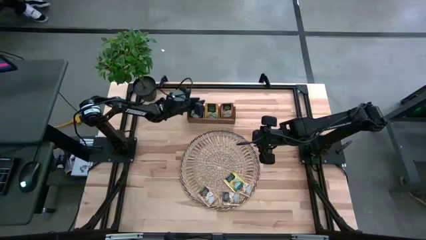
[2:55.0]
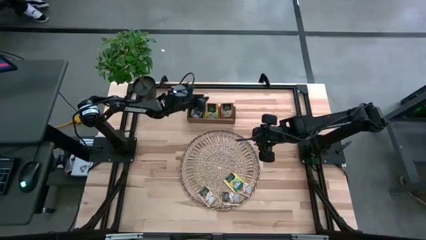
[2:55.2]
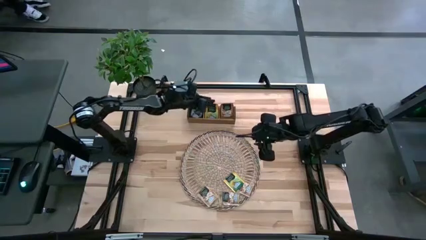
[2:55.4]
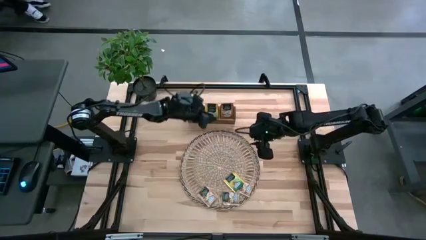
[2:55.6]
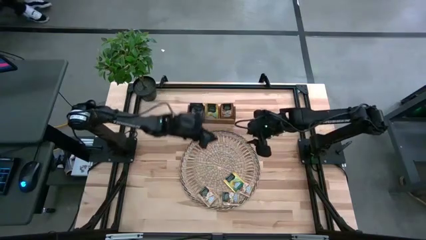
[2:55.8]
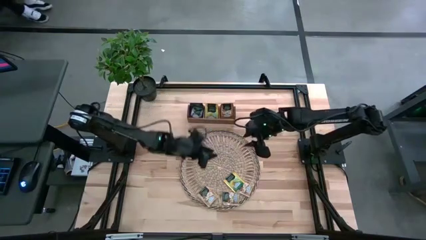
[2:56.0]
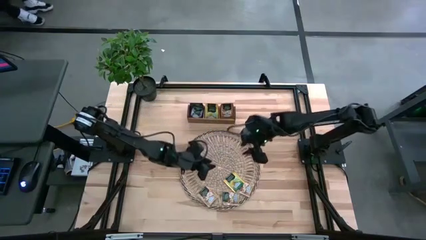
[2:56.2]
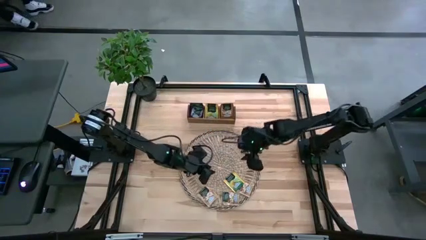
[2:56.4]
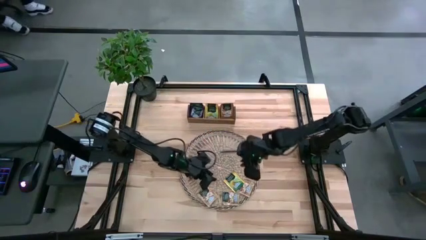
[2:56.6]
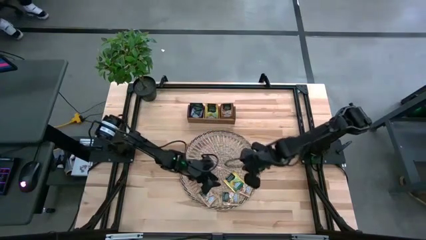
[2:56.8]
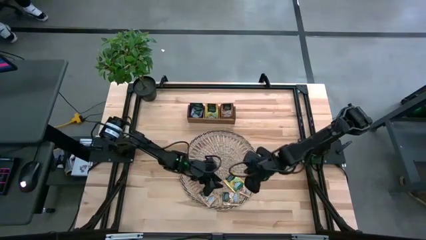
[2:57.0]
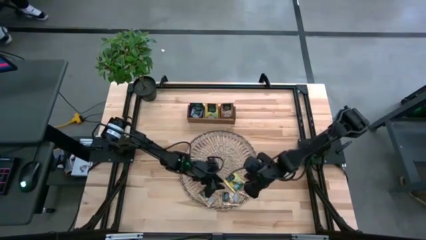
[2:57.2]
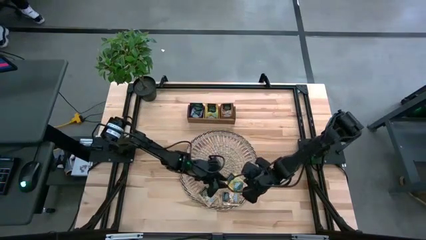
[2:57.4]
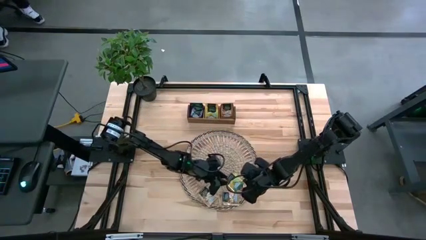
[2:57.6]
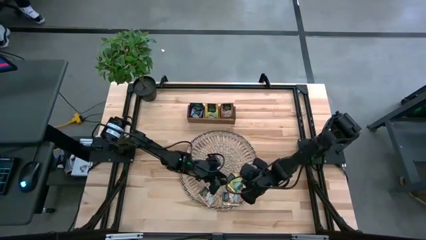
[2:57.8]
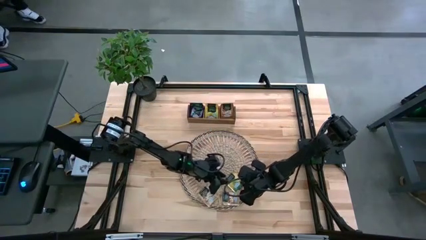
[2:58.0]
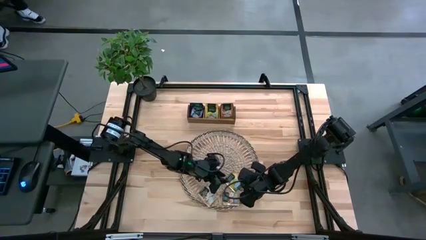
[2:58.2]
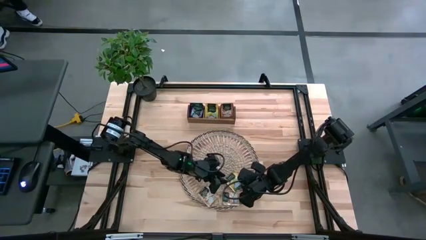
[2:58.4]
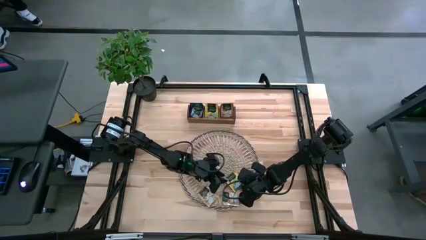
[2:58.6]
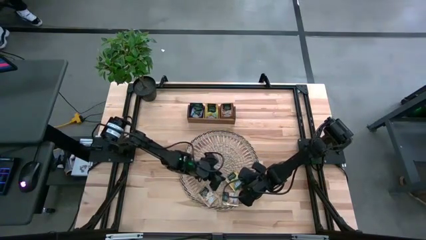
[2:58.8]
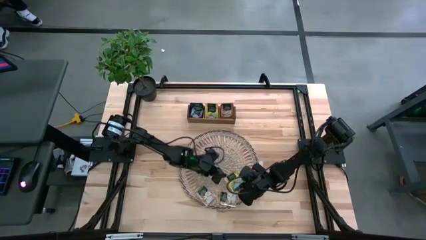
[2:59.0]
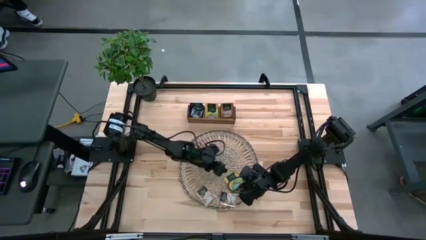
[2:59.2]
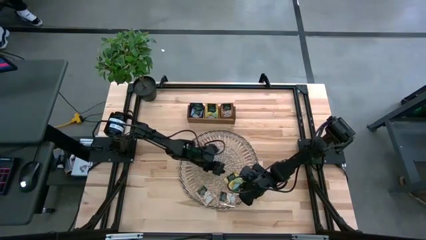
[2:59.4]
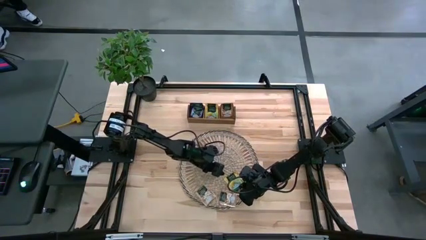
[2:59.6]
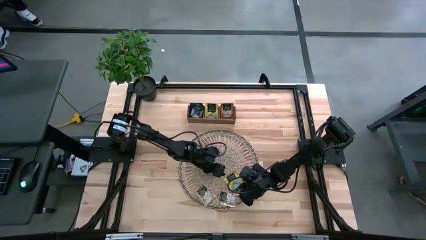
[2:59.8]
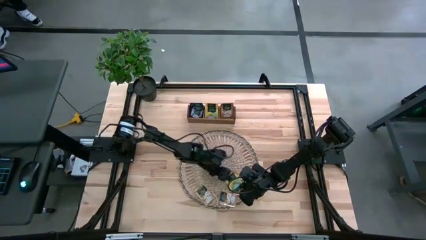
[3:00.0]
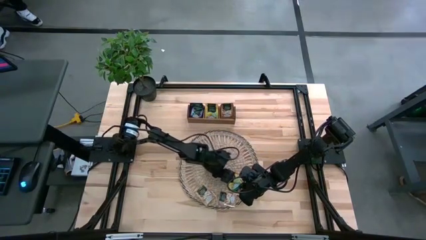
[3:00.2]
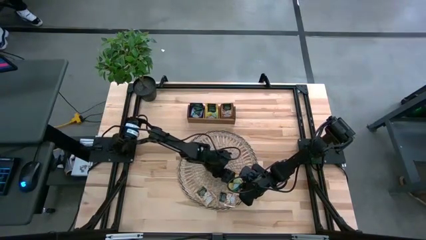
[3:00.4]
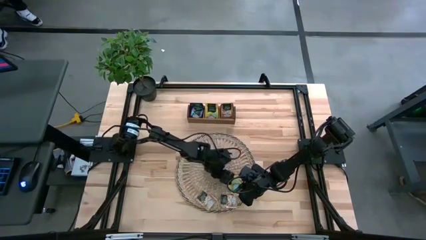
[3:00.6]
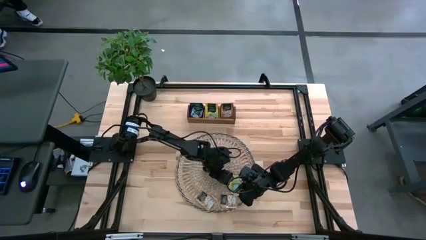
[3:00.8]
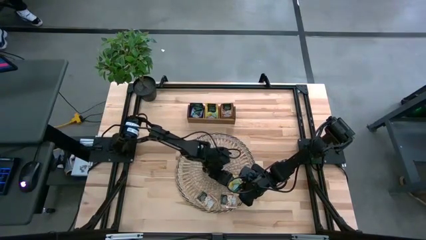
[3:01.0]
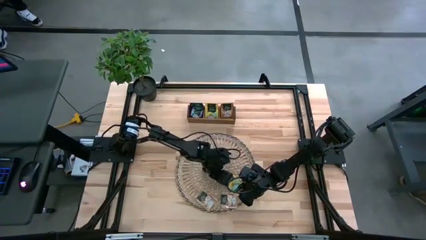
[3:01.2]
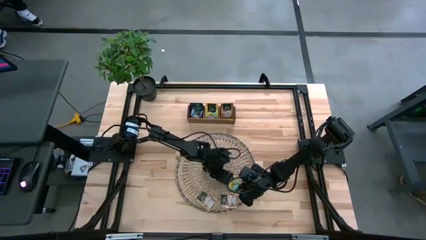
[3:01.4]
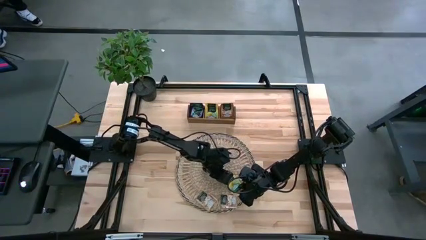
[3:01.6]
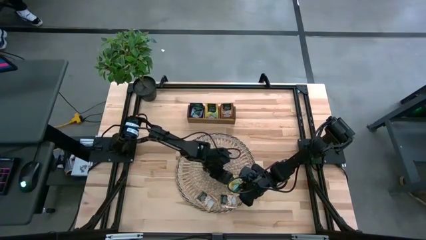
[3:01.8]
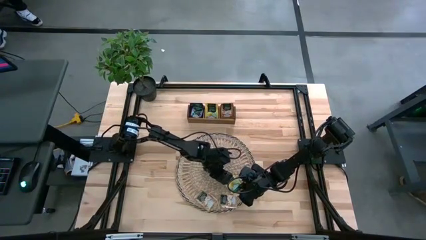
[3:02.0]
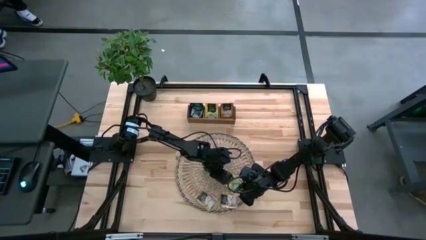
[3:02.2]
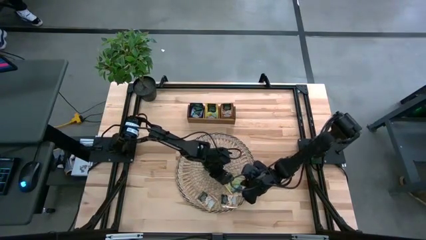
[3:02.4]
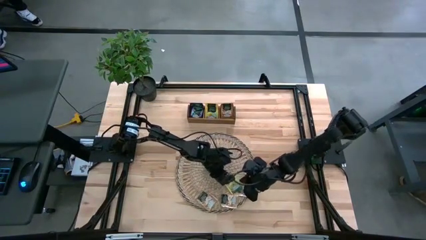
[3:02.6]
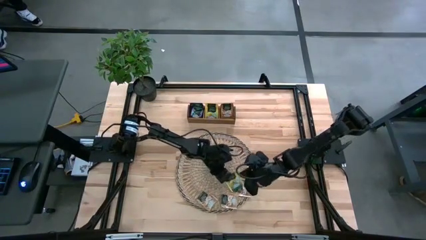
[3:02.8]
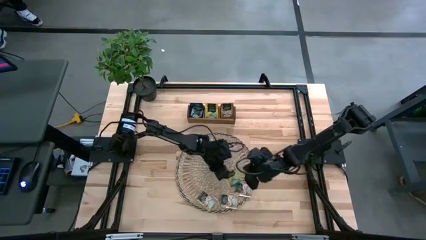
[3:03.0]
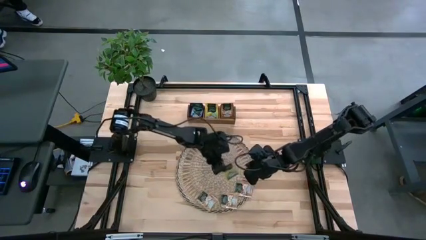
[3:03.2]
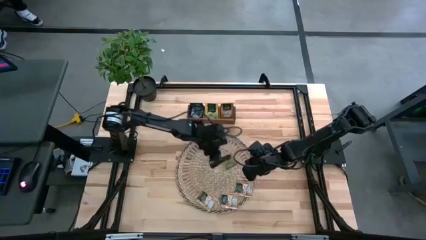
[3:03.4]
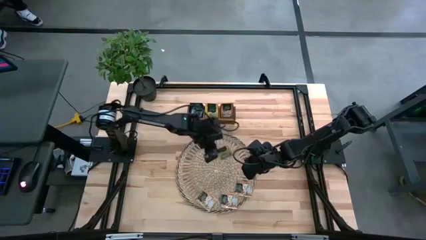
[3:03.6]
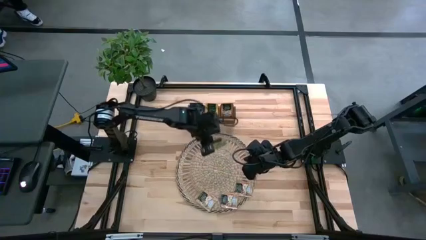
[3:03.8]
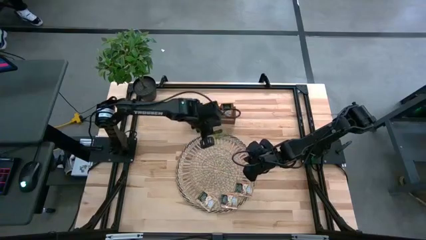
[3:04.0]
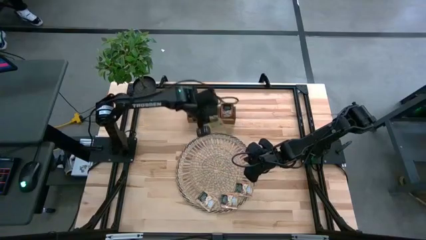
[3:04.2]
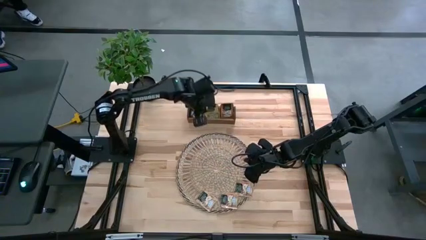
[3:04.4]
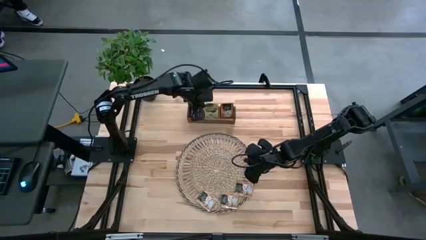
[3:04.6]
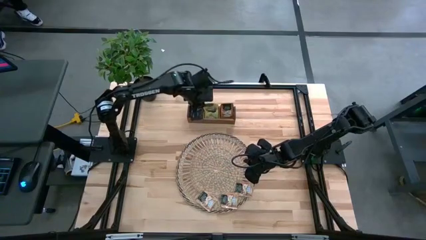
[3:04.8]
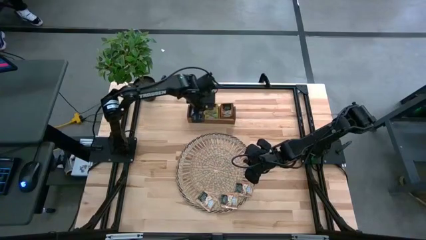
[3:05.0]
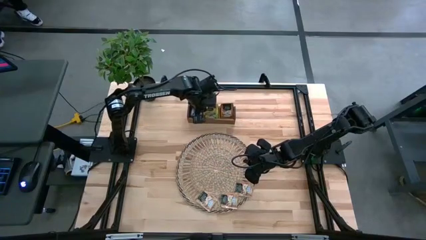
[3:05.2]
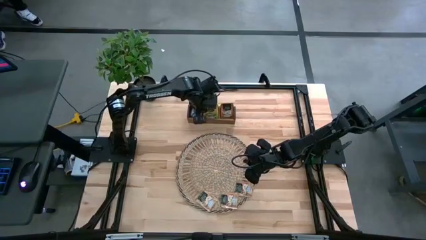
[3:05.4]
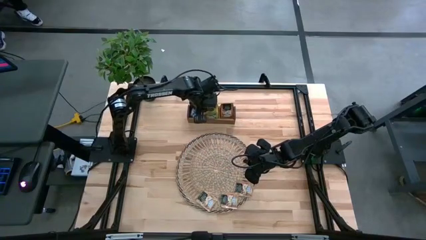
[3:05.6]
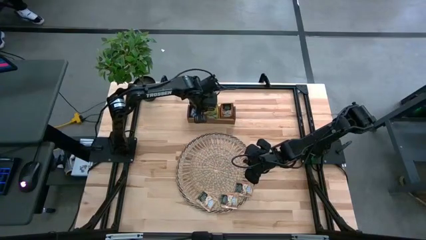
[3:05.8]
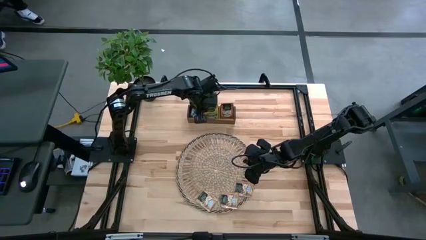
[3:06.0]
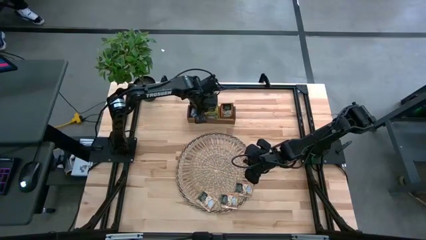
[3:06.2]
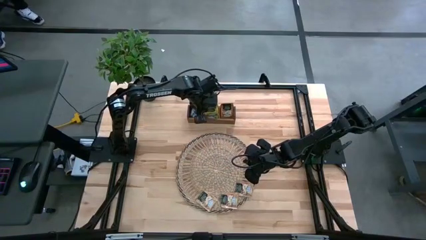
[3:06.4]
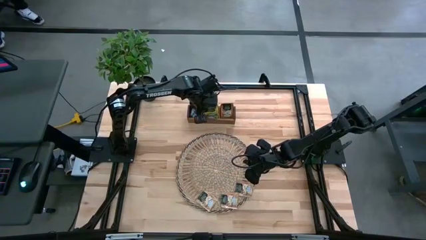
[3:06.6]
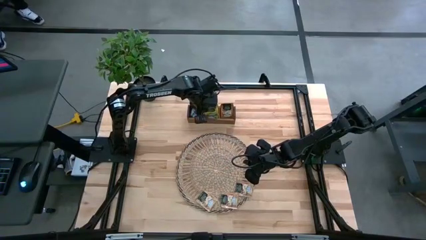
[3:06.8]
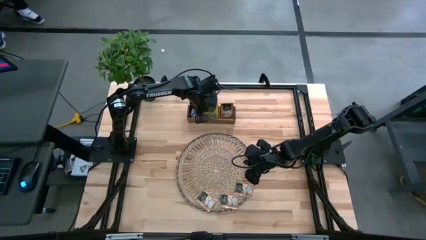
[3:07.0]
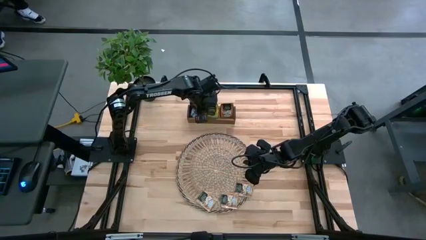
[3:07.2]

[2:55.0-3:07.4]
Task: Pick & Place Tea
Put the yellow tea bag in the middle section of the wooden organizer

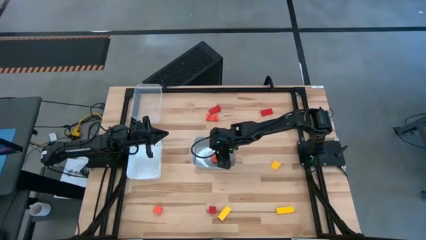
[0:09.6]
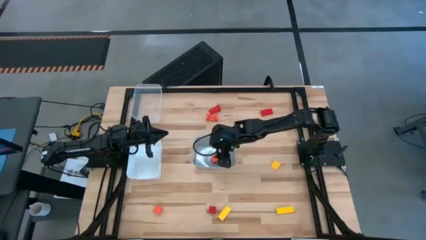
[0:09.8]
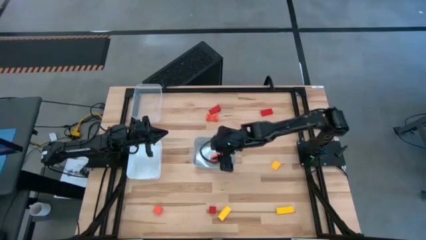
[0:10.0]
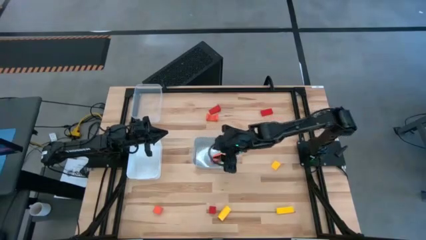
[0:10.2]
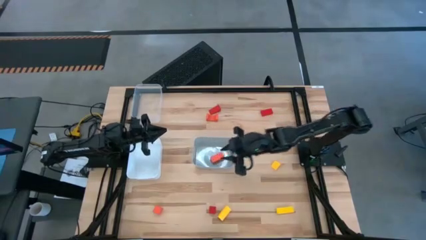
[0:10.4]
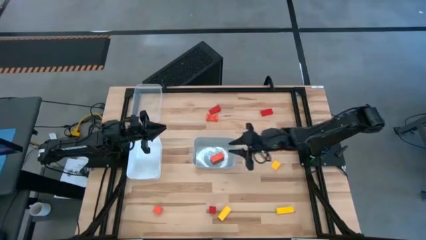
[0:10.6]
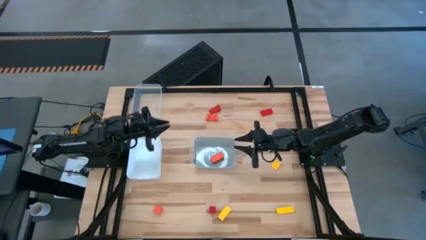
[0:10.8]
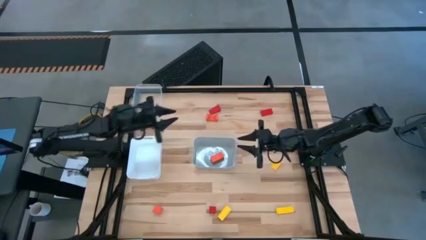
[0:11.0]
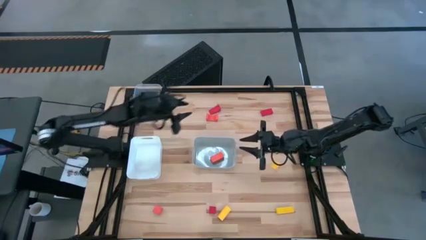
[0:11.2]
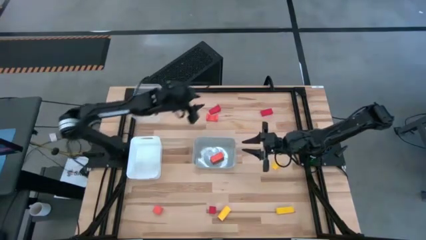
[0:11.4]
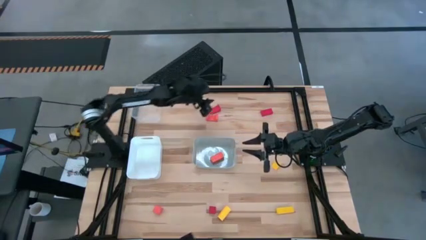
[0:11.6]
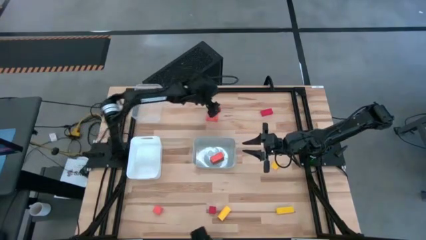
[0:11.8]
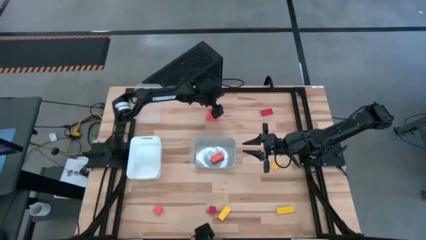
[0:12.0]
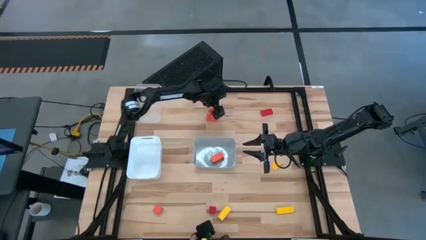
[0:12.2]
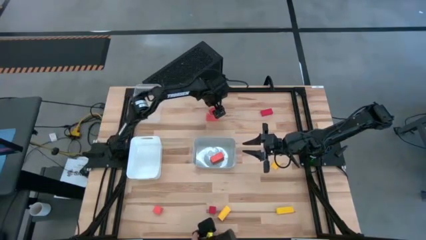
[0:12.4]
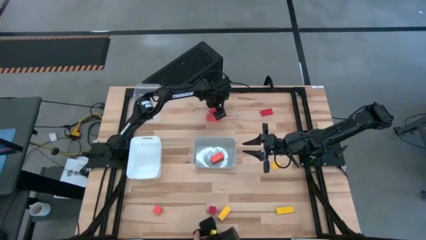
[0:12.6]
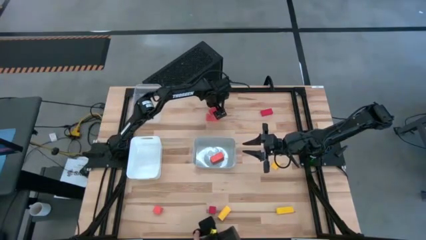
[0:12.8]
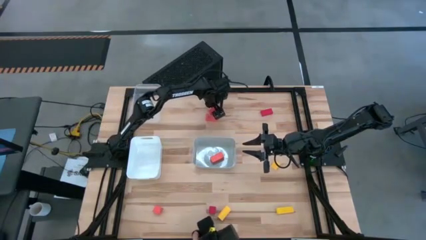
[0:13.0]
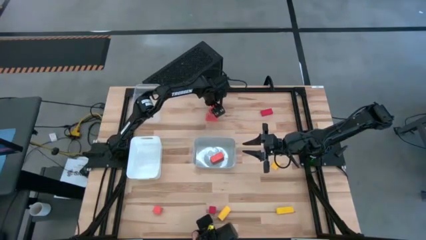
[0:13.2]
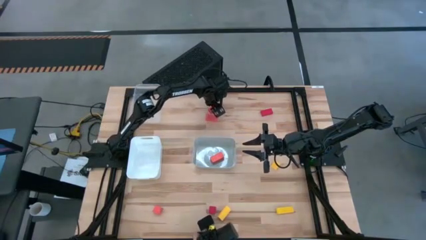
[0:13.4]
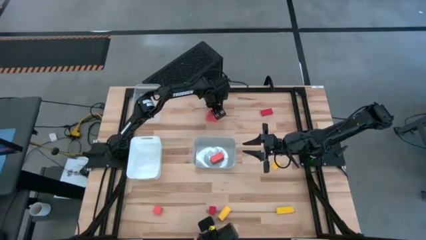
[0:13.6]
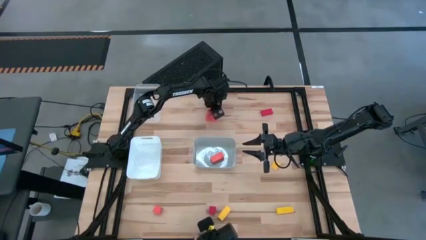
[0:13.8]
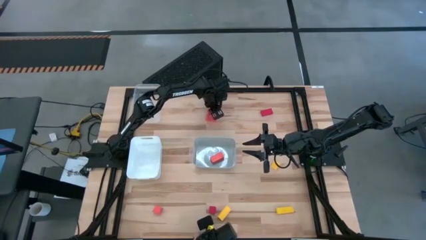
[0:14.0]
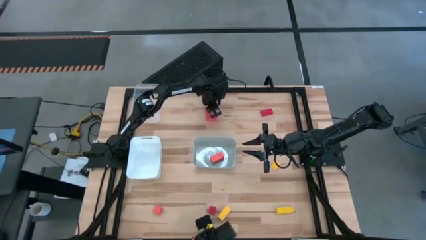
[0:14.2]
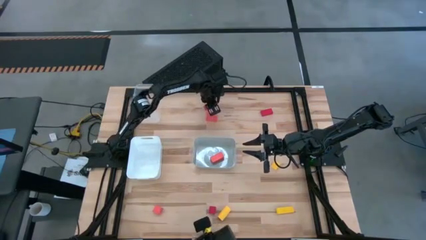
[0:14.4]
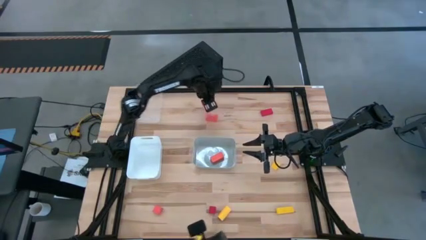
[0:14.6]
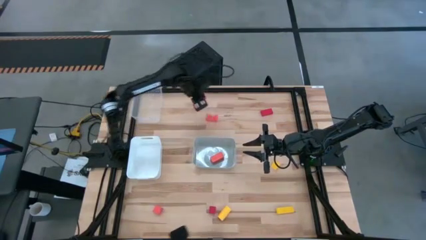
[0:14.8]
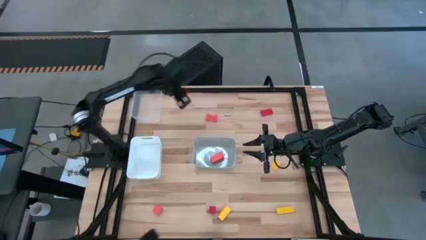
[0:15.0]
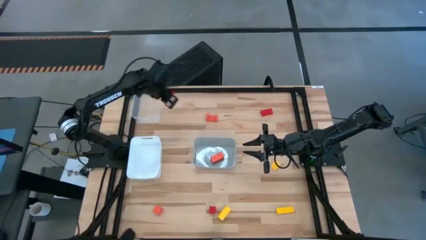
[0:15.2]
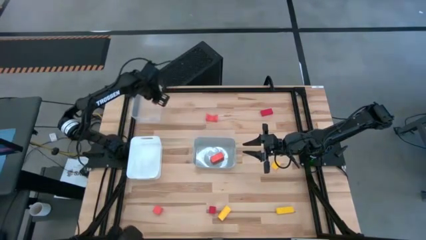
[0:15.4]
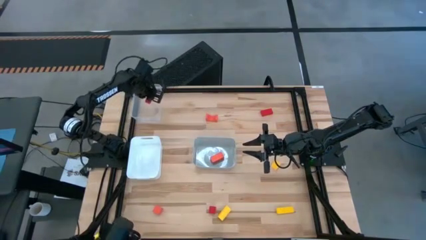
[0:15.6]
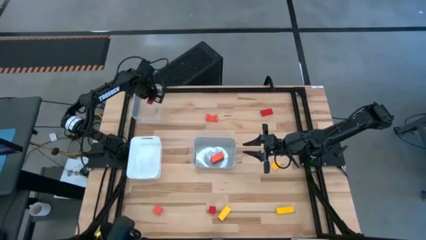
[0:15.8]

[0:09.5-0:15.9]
Task: Sort & place blocks by color
Put the top right red wooden block into the transparent bin
